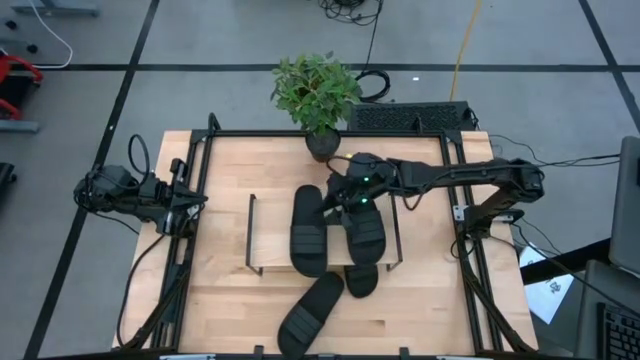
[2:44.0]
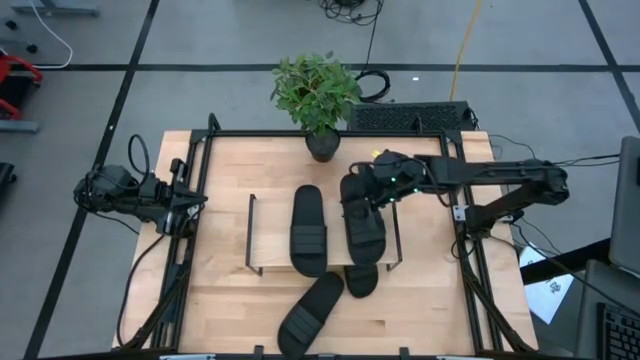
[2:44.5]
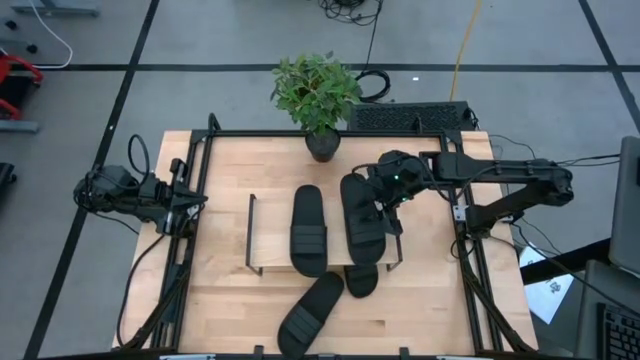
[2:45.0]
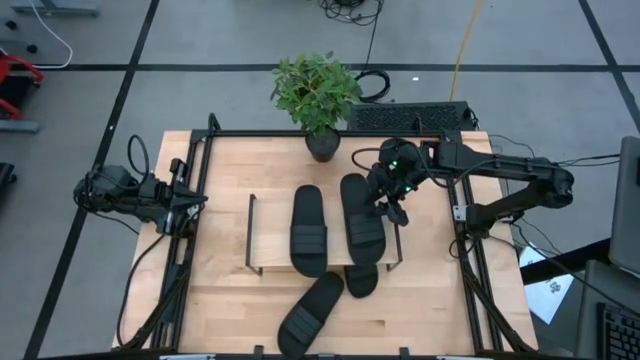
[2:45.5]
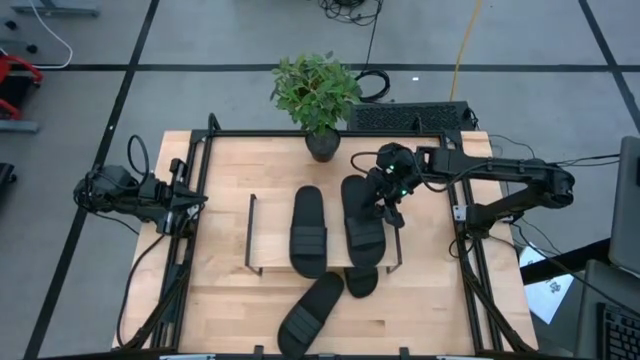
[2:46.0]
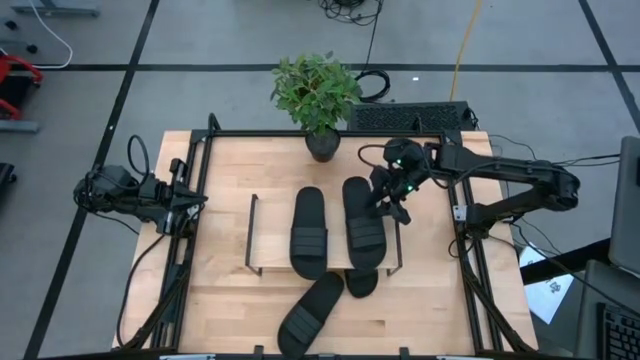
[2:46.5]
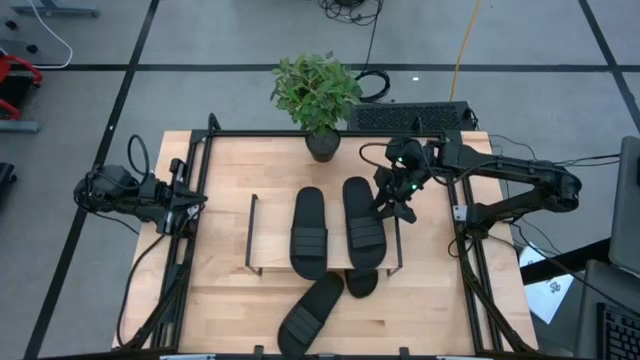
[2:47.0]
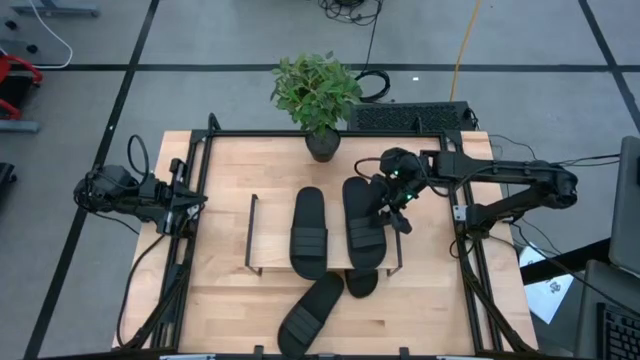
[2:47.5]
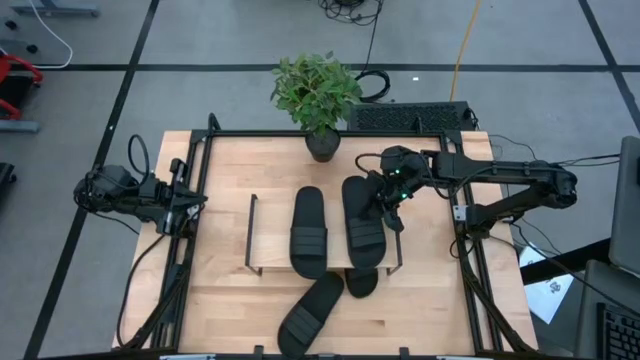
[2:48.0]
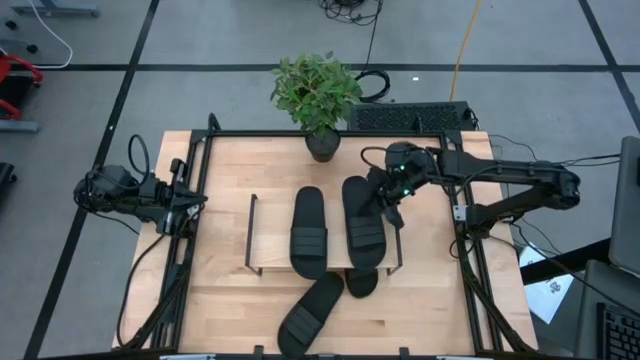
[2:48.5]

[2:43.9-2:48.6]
Task: Pick and place slides into the shelf
Adjust the black slipper on the shelf

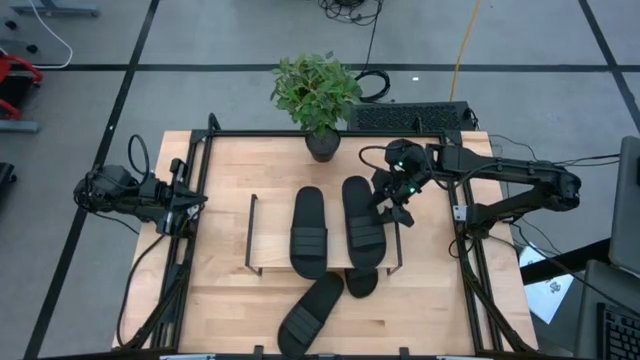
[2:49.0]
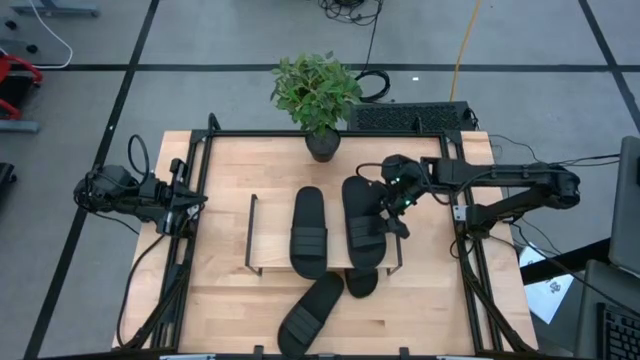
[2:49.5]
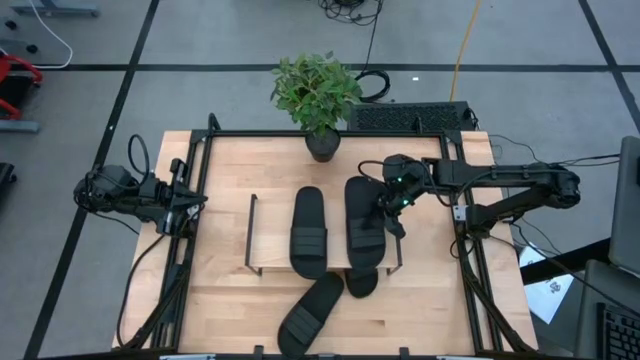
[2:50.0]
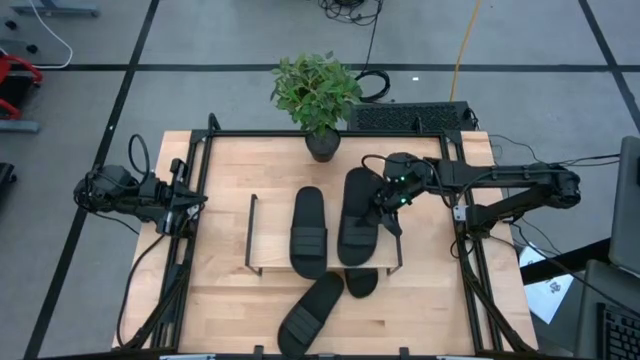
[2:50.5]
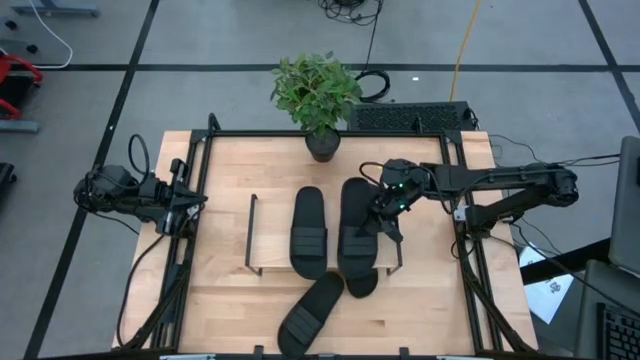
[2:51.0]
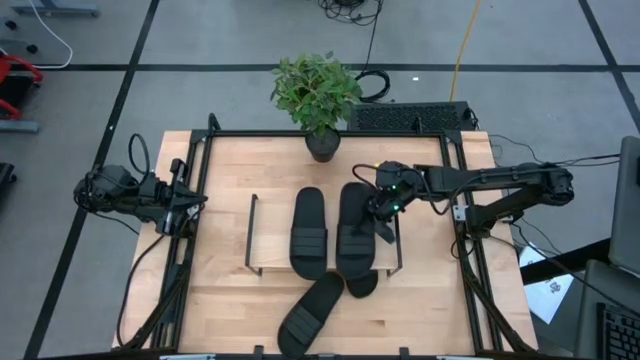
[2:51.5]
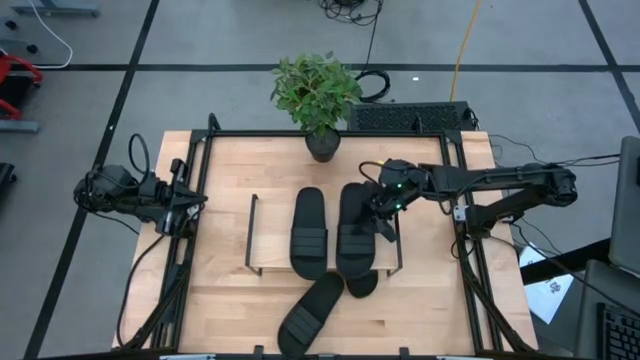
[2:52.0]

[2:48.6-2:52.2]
Adjust the black slipper on the shelf

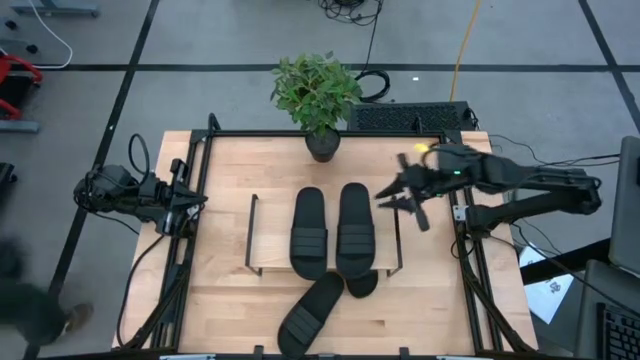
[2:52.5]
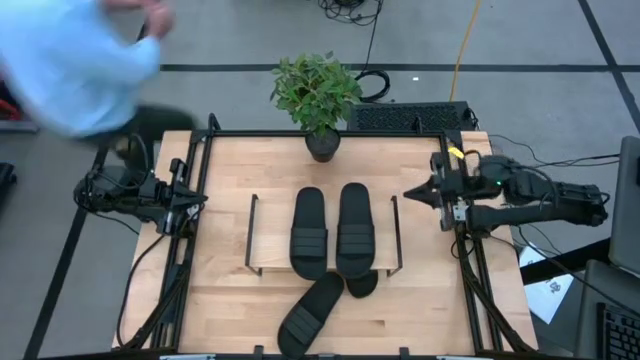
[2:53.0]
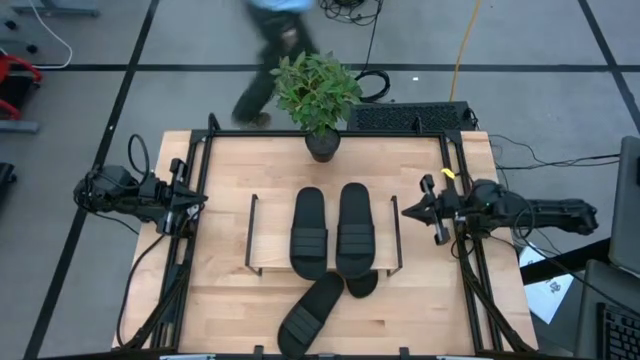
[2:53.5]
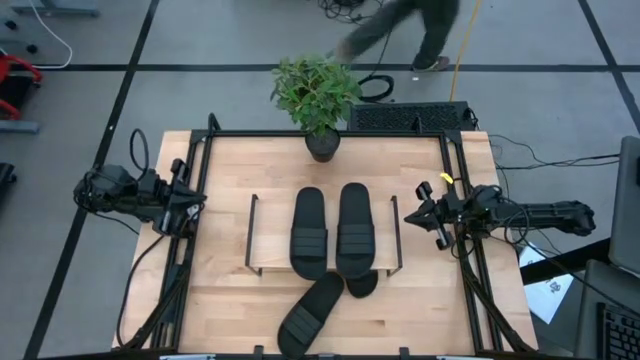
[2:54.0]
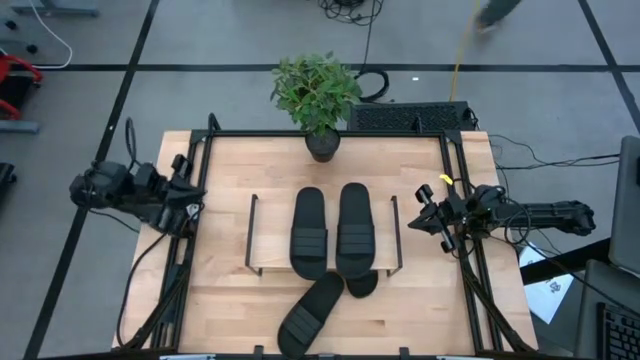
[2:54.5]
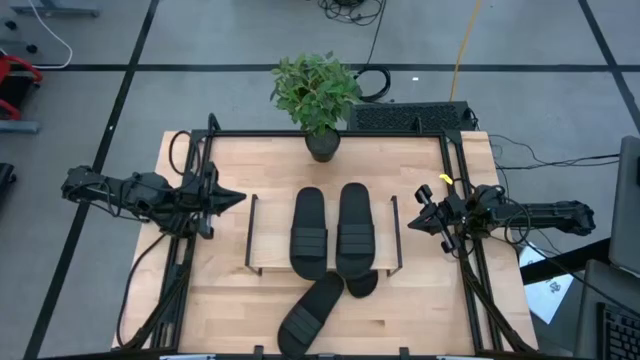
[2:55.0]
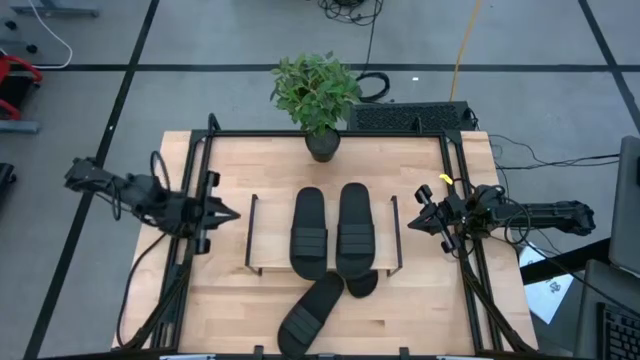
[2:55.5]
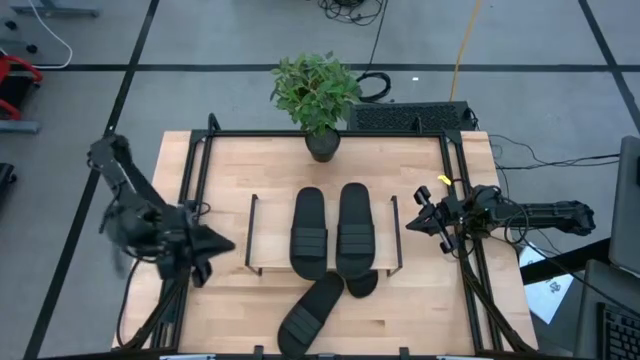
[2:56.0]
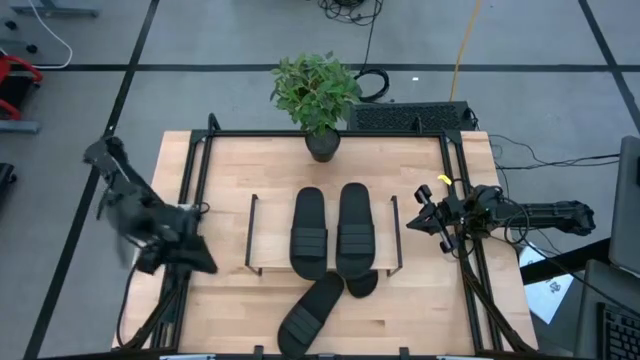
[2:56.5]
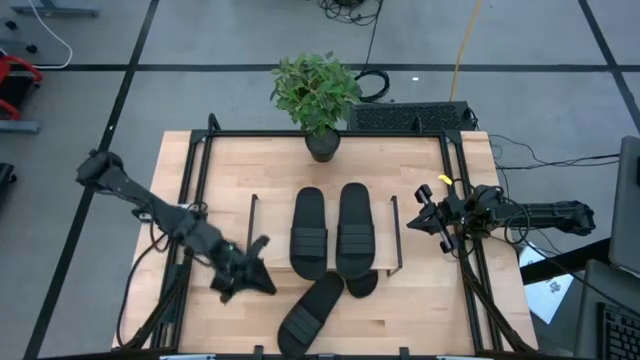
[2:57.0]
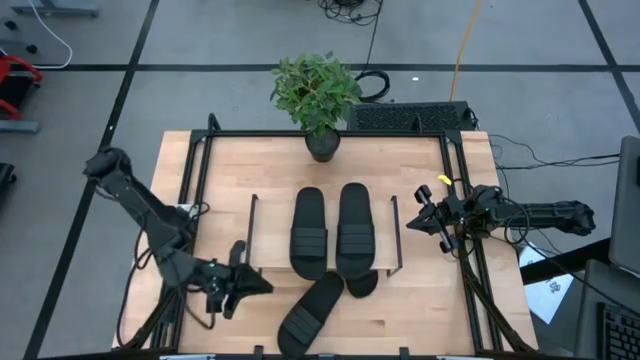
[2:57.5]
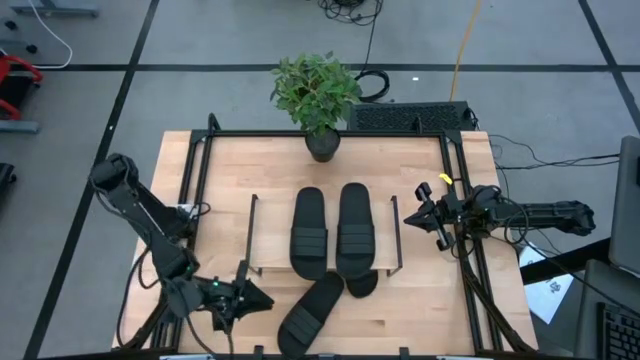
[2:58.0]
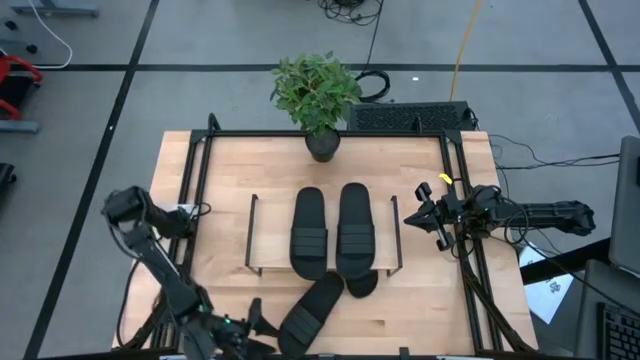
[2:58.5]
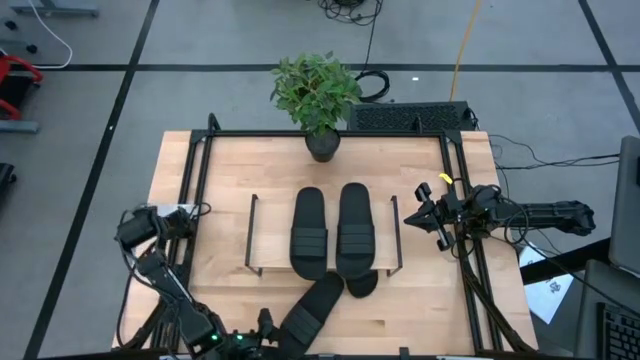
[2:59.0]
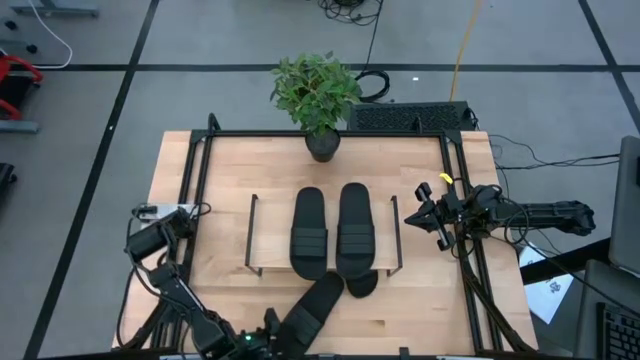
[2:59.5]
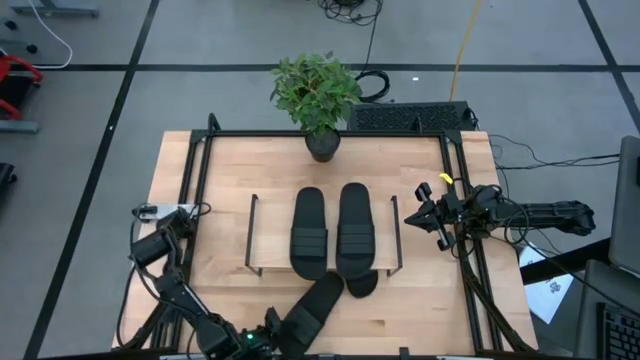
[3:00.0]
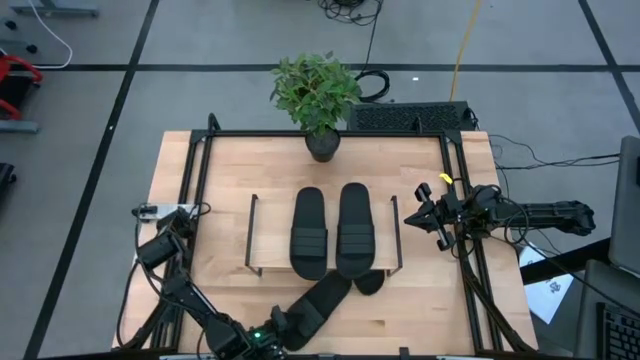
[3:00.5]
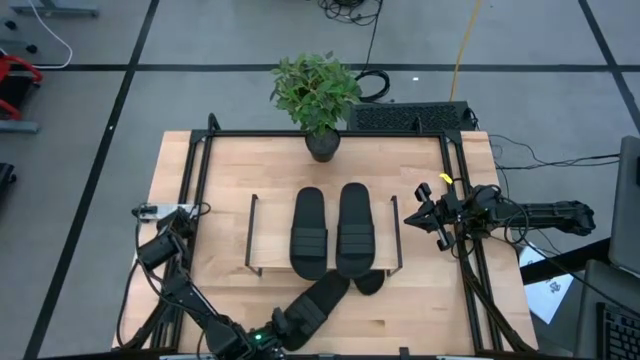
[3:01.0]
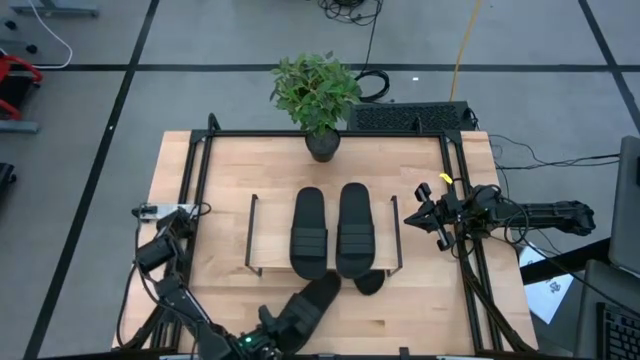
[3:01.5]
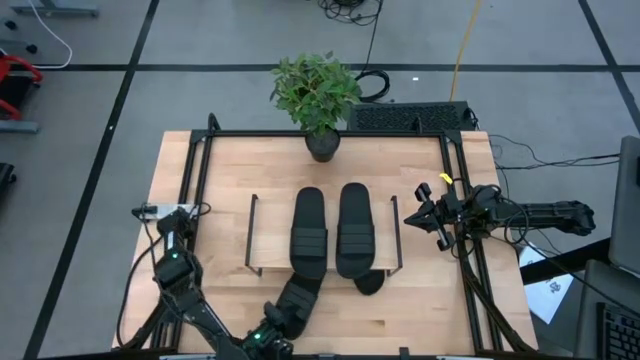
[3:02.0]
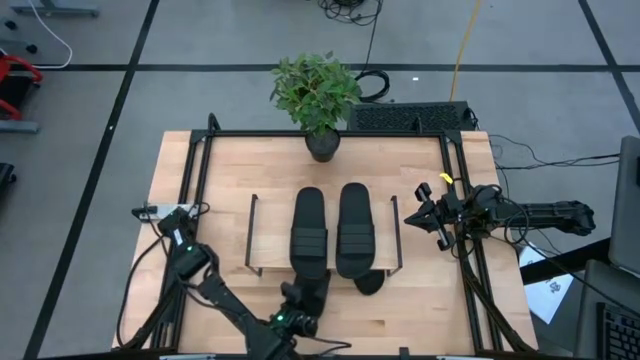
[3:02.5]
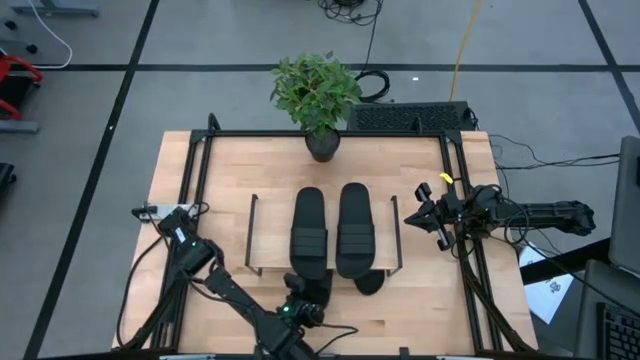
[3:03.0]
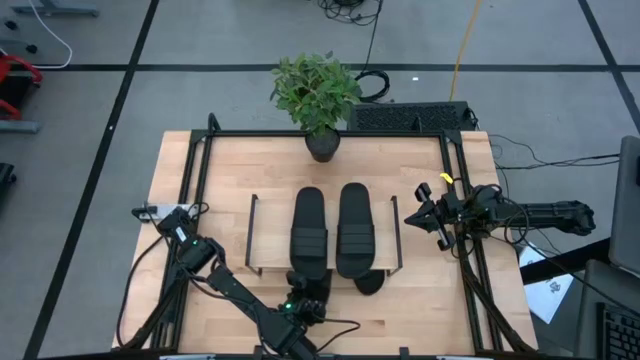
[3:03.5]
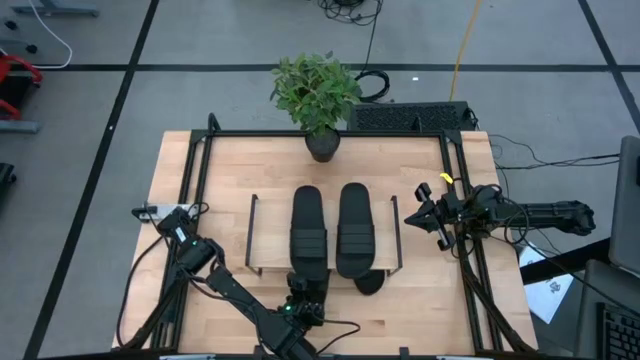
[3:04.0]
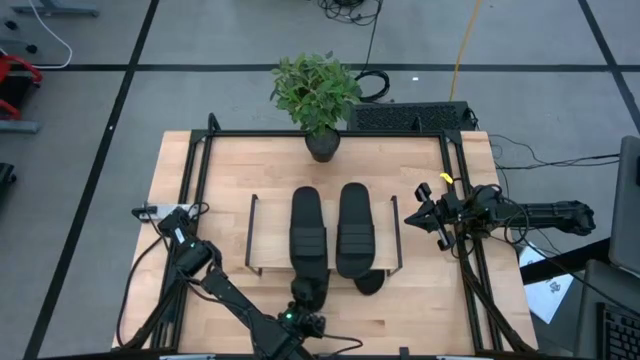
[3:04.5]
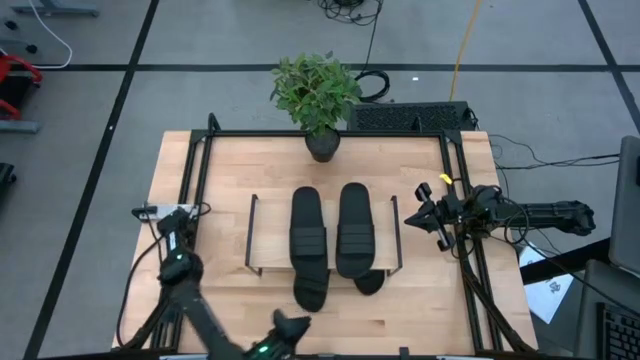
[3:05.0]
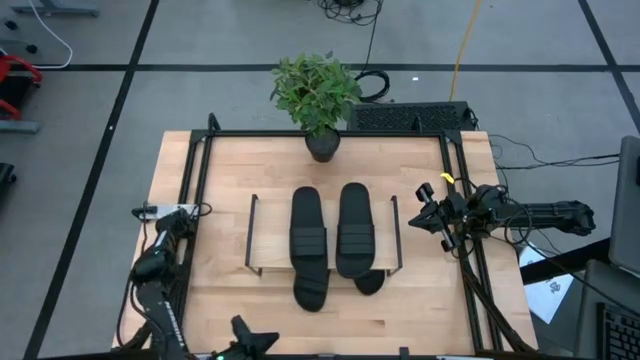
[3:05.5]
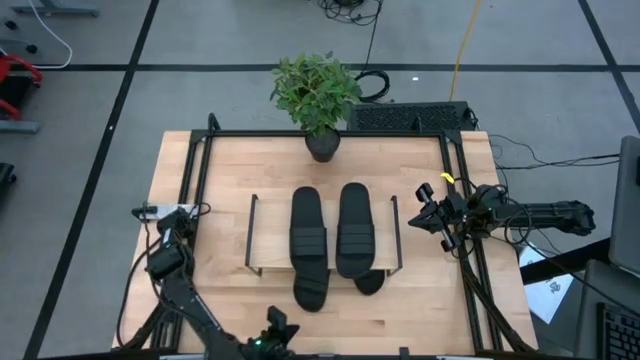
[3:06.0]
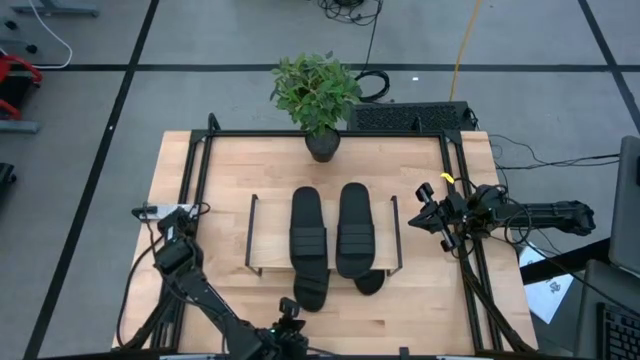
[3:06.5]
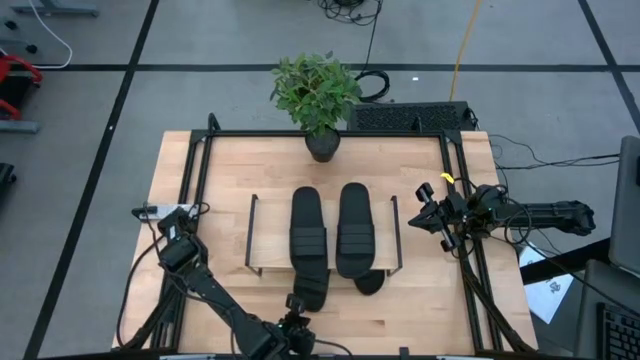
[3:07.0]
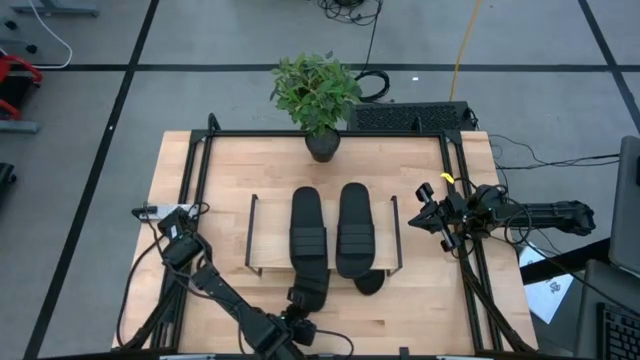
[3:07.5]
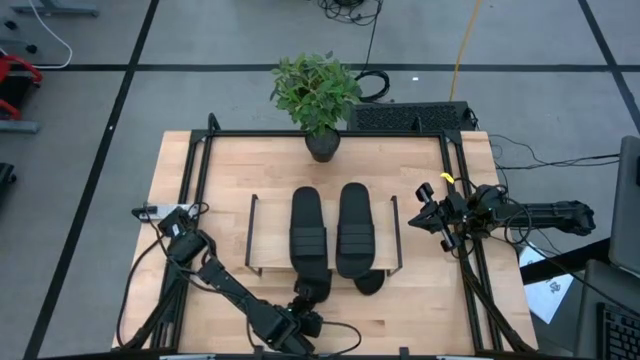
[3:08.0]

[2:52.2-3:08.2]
Put the black slipper under the shelf
